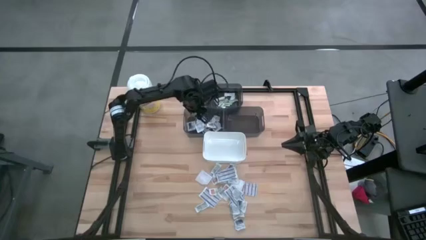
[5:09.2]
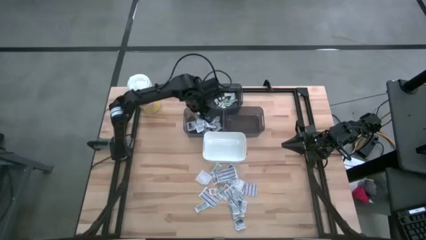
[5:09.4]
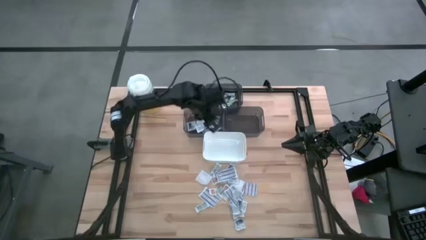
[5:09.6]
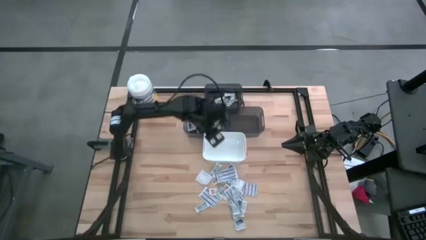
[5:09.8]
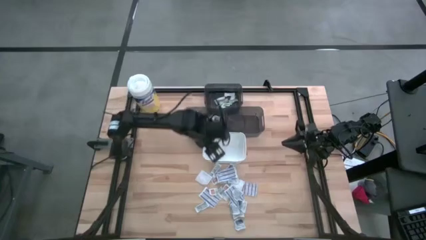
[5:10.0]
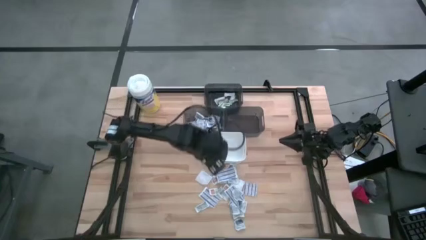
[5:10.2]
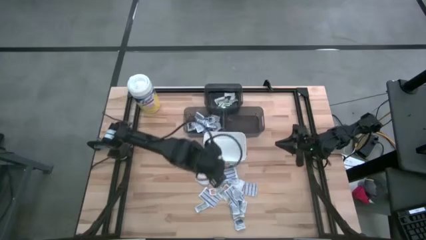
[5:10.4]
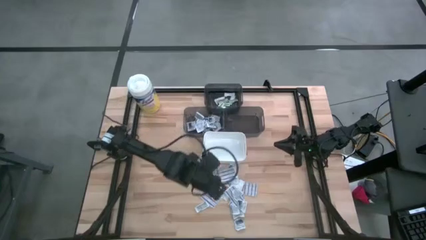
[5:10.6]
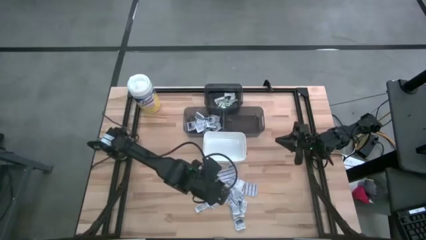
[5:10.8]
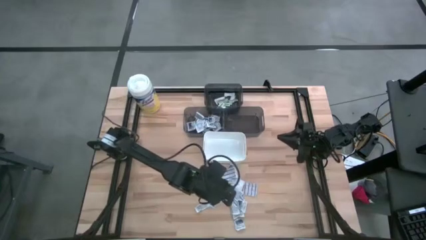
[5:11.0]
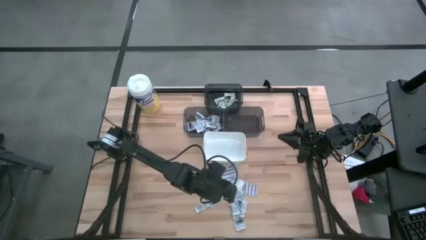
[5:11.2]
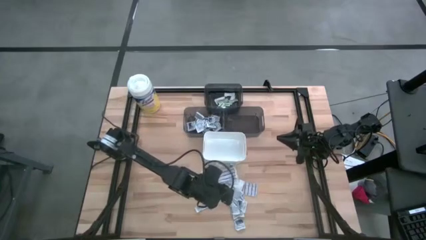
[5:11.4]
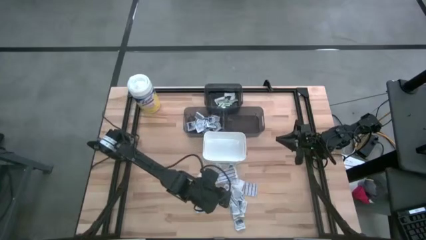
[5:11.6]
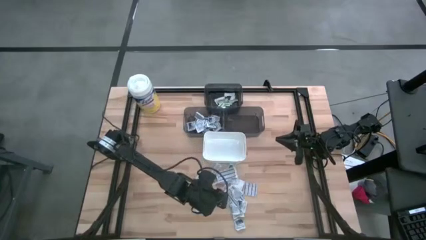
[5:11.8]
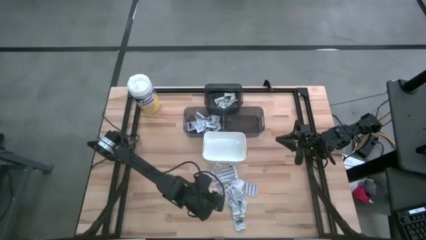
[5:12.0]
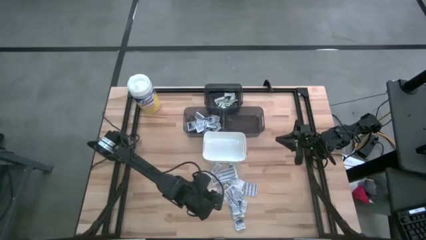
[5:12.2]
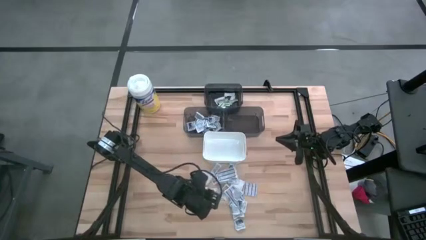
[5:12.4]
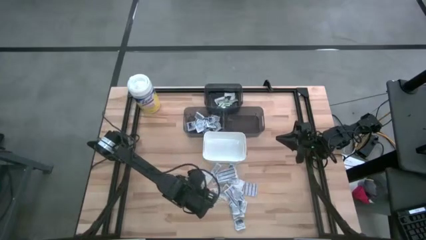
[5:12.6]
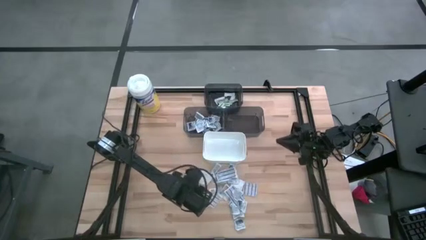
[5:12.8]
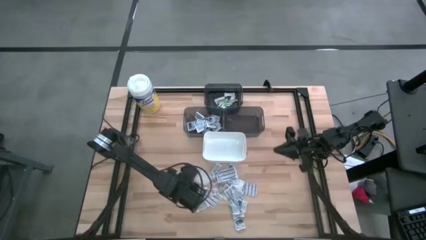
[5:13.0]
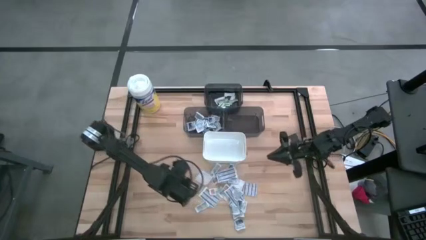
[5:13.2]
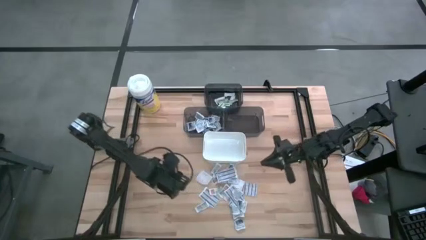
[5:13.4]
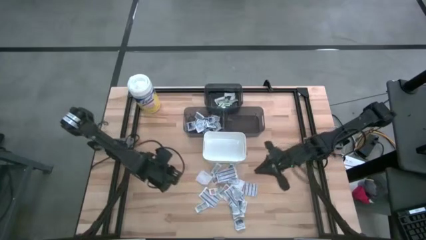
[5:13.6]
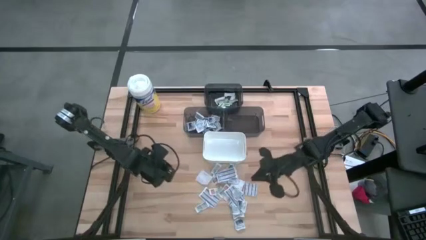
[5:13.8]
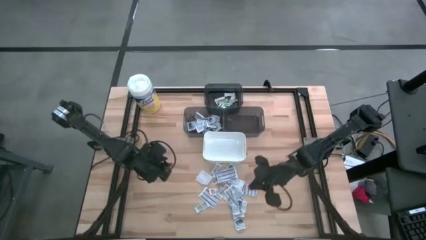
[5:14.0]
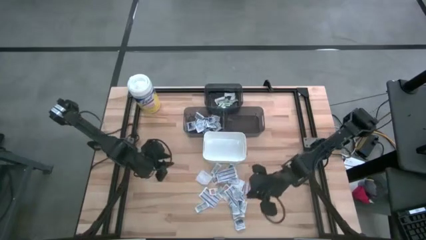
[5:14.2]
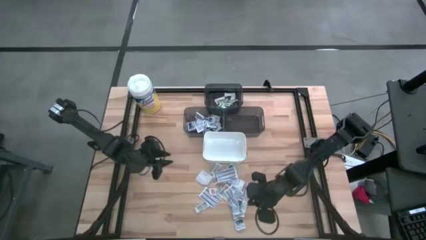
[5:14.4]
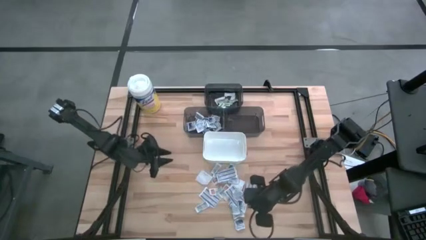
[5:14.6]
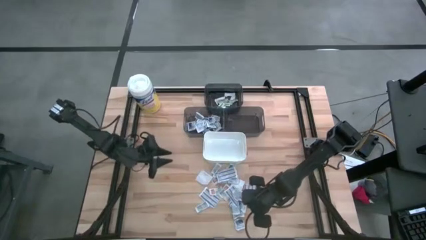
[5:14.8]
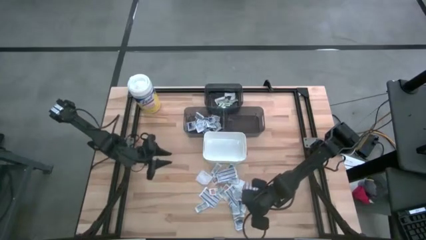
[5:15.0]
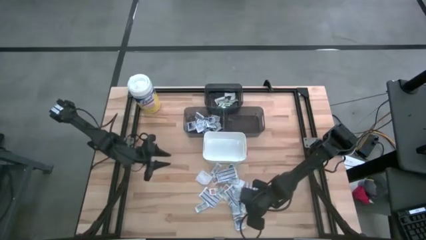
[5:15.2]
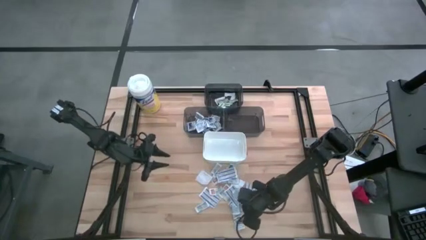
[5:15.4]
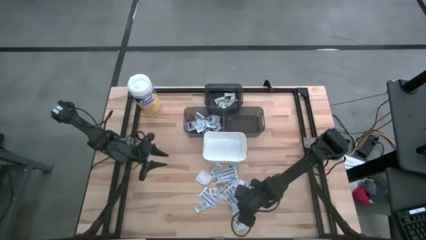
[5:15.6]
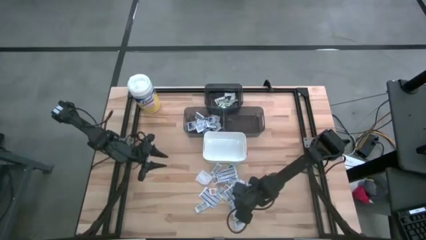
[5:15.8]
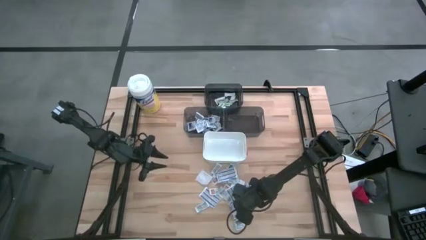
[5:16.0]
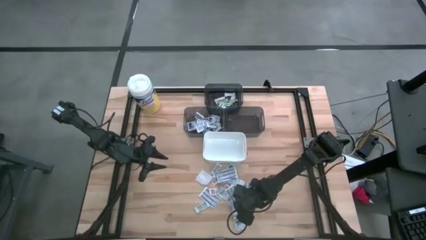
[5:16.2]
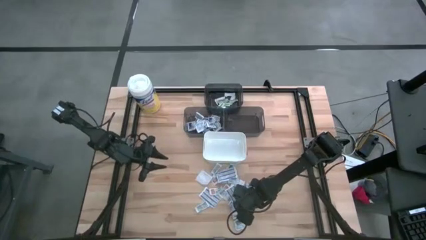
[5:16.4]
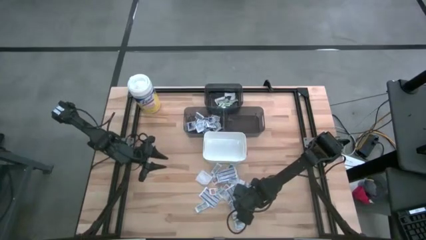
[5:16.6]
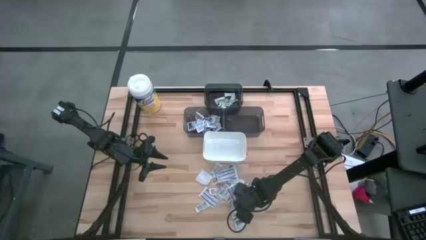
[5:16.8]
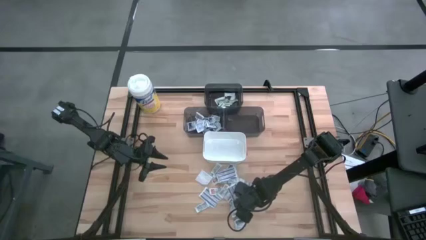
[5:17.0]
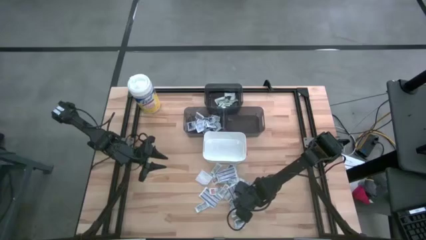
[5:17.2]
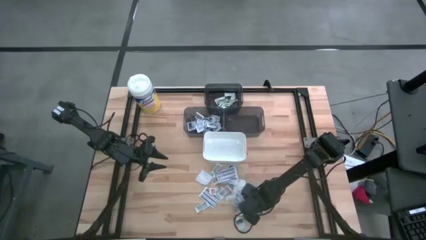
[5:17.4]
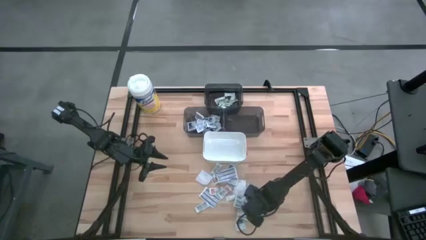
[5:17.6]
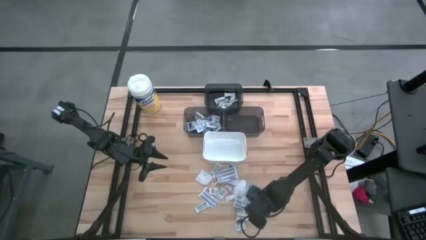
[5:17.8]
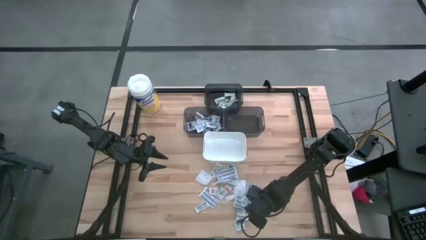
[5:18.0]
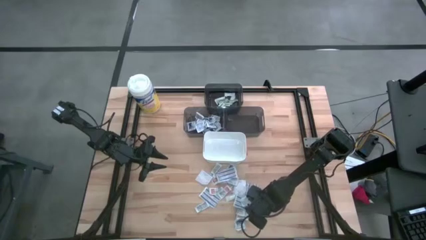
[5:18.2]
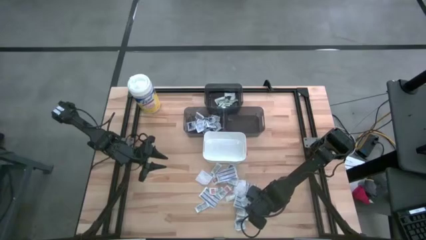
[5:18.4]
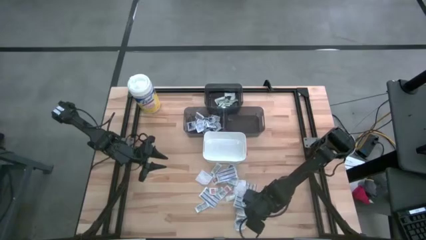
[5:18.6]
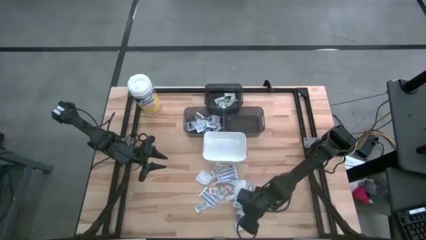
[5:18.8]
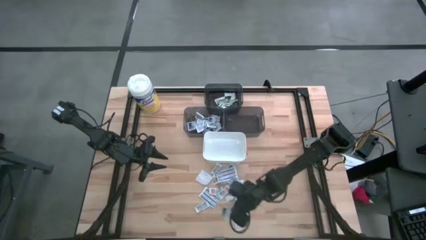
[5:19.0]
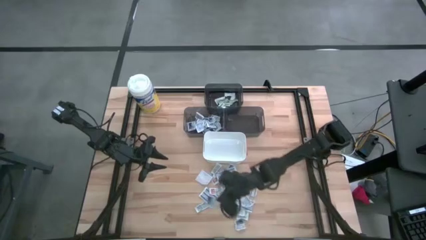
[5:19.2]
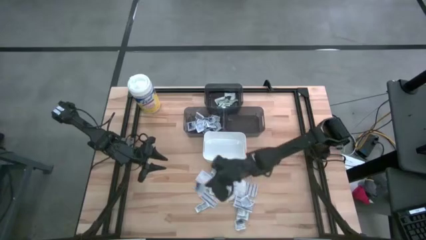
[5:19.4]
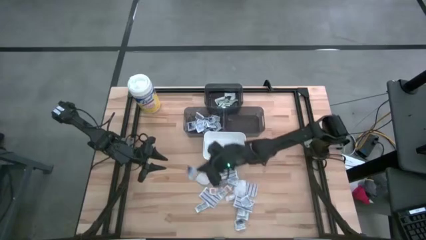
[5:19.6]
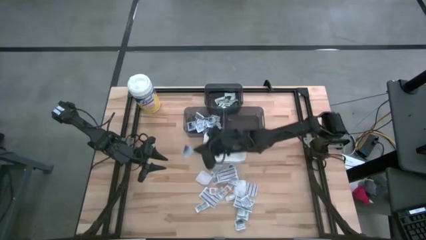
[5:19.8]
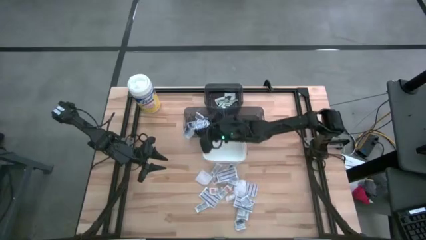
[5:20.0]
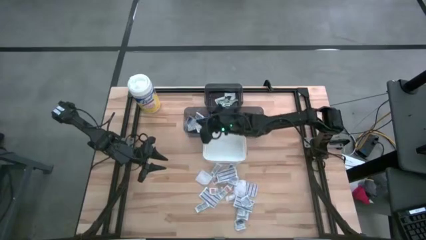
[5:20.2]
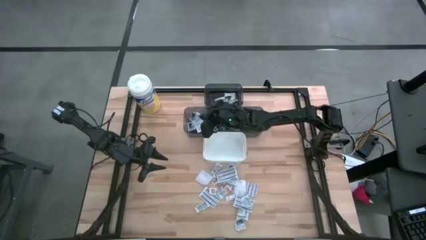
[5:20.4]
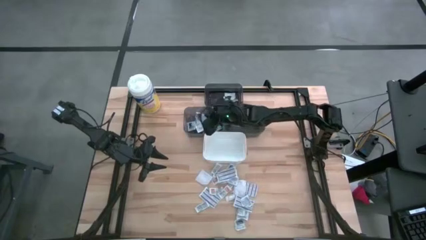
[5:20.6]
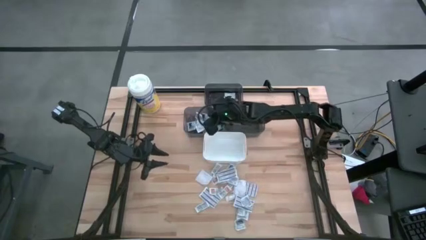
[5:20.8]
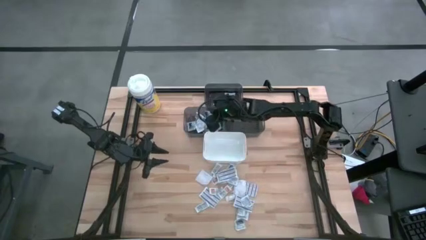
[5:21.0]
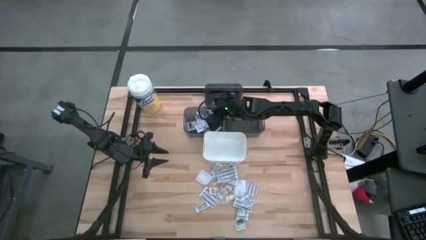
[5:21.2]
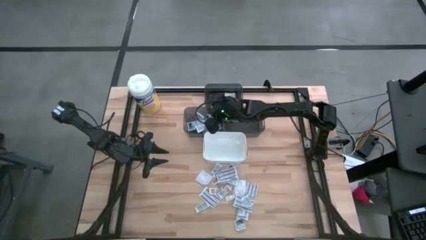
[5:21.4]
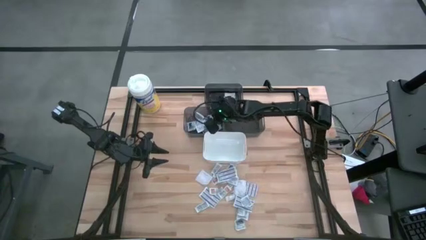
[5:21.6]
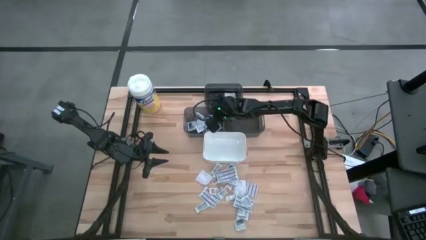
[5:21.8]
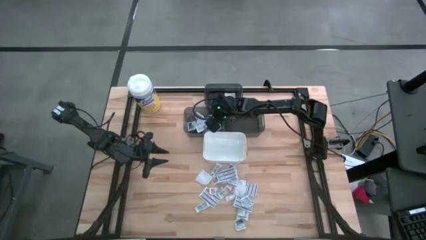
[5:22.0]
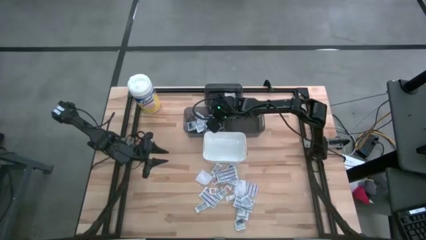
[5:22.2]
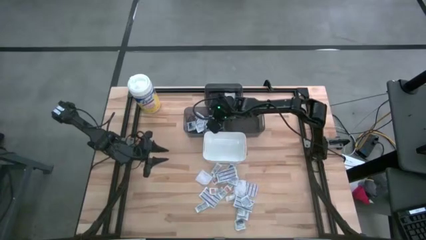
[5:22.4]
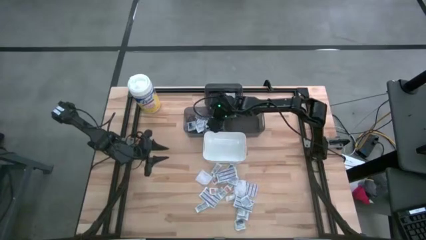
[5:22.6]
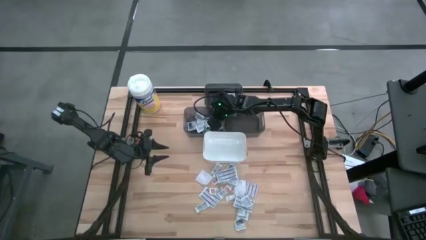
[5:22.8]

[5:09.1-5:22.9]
Task: Pick & Place First Aid Supplies
Put the alcohol pad into the left black bin

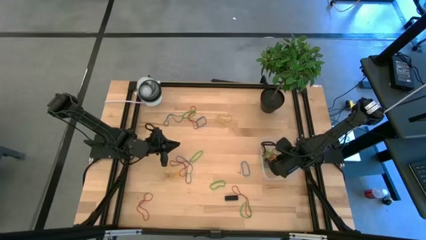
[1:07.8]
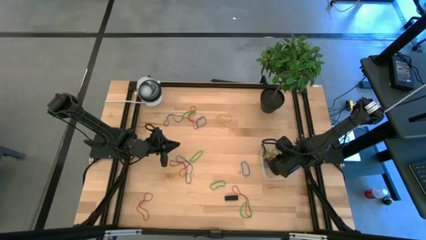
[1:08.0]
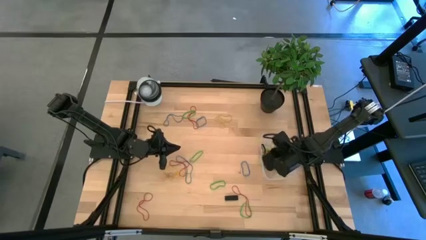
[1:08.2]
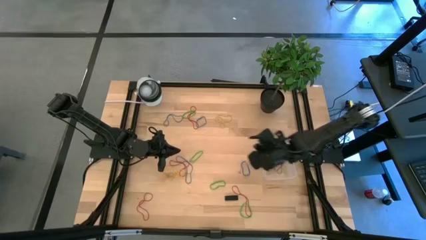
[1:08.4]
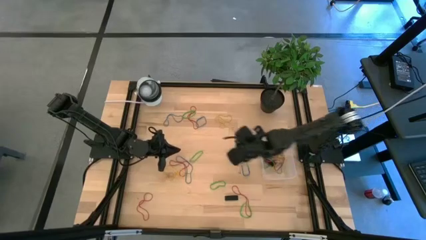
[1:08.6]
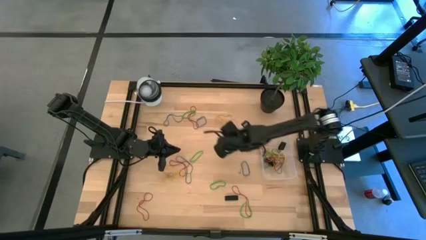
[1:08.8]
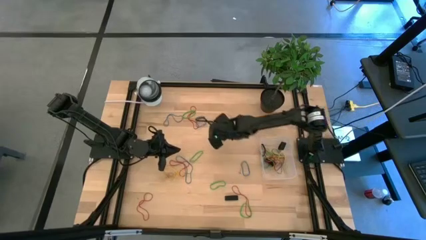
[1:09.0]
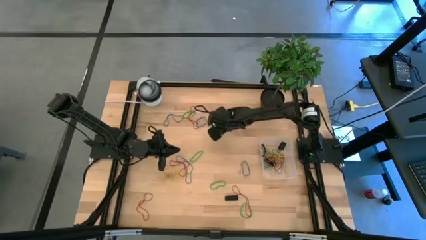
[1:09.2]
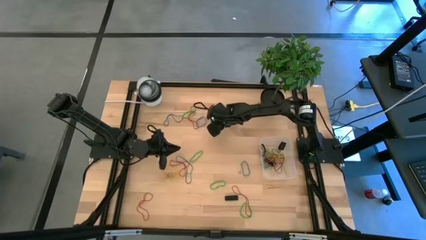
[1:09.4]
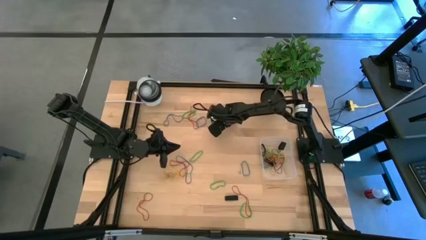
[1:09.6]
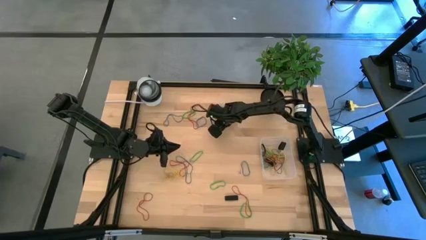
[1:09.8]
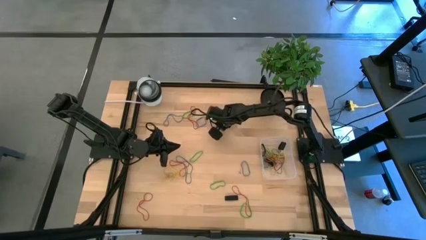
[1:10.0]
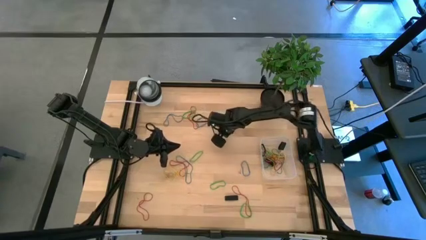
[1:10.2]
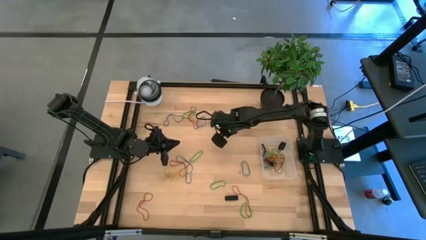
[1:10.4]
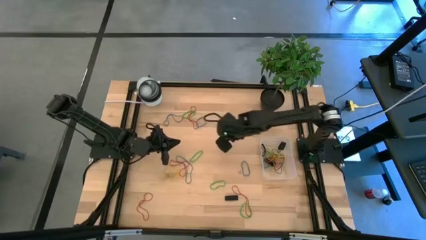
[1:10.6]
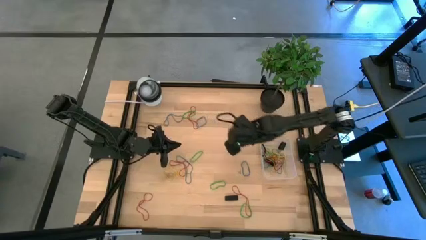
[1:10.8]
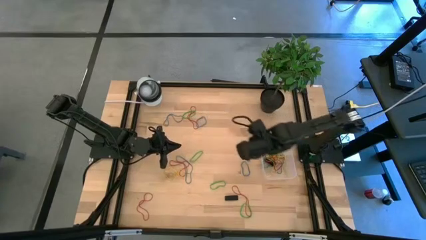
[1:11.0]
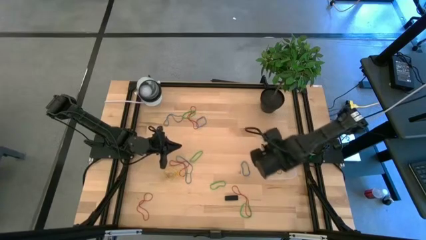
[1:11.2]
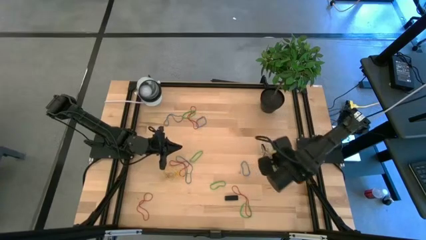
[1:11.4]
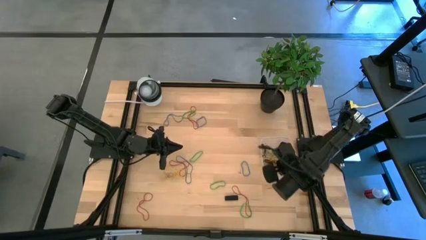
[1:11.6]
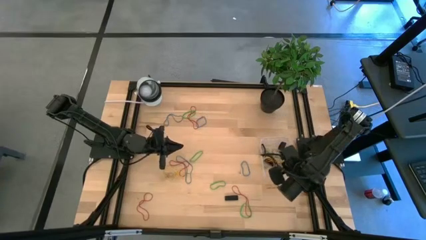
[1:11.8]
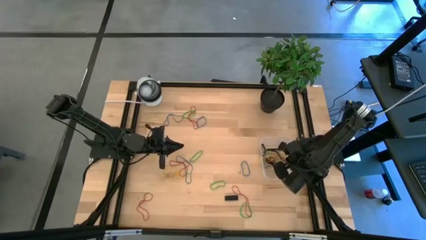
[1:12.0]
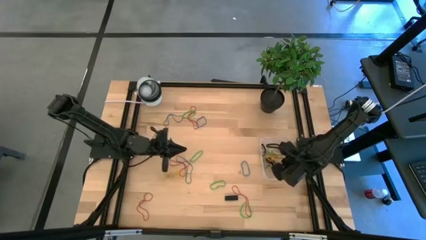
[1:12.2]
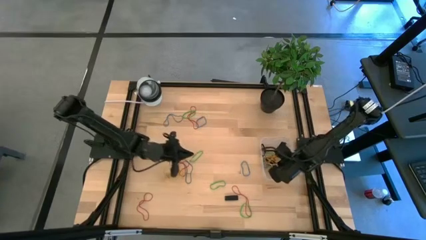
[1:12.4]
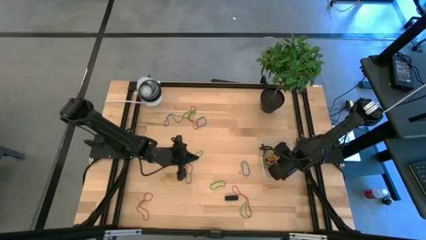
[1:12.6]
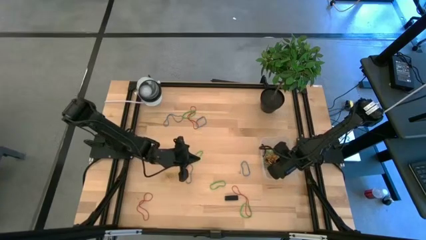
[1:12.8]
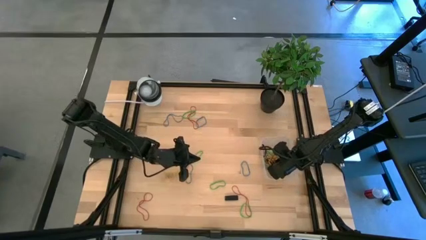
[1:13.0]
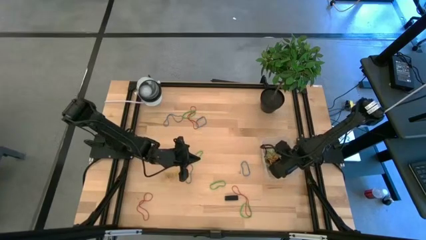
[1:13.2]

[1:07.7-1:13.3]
Task: Pick and place rubber bands into bin
Put the yellow rubber band into the transparent bin
